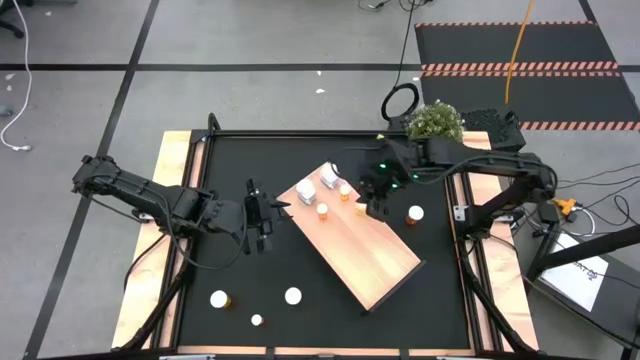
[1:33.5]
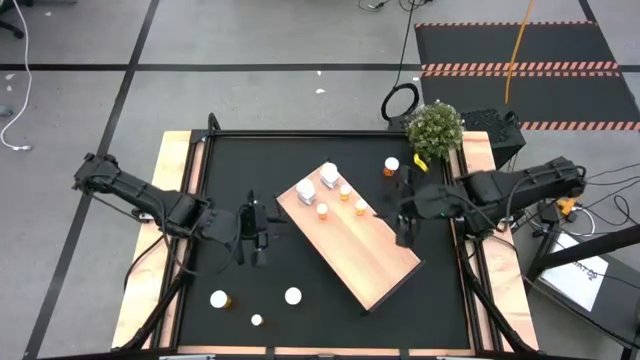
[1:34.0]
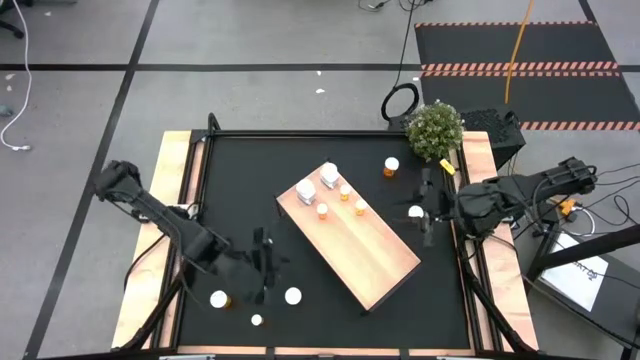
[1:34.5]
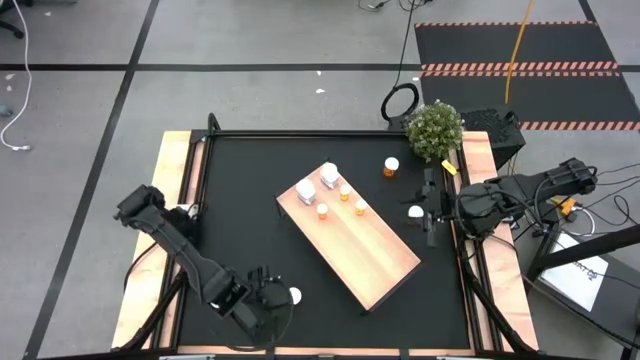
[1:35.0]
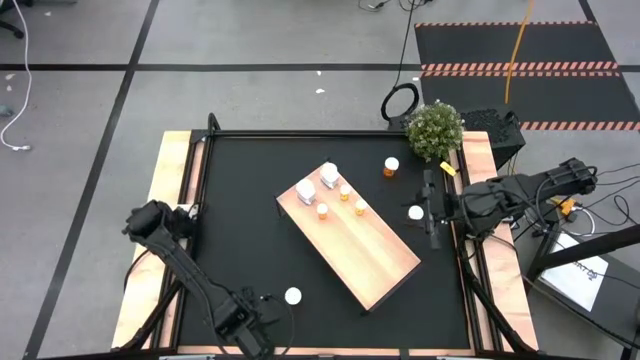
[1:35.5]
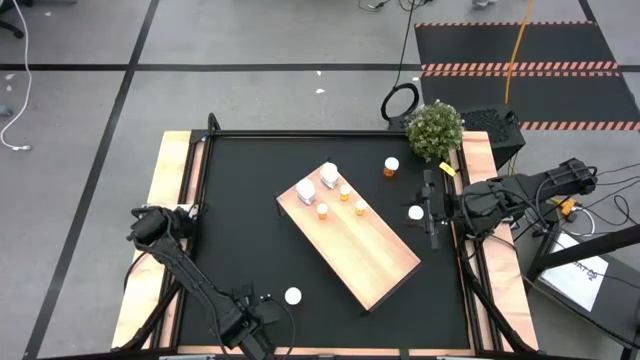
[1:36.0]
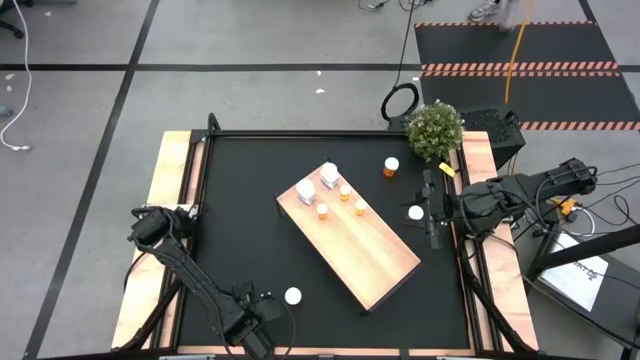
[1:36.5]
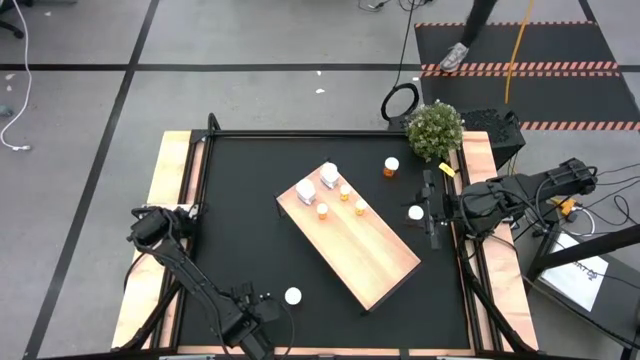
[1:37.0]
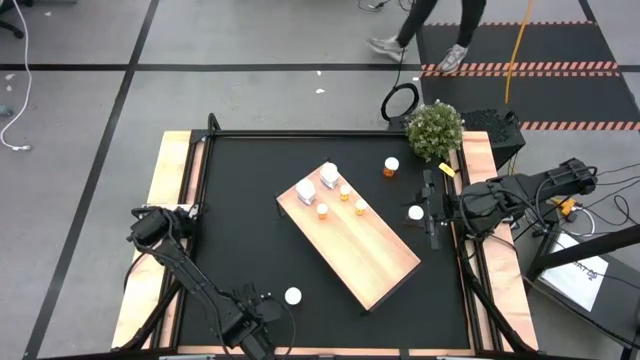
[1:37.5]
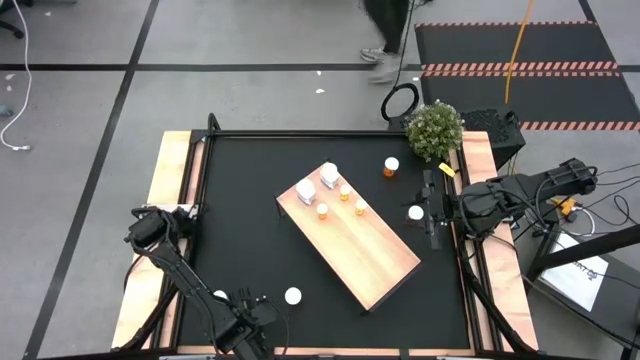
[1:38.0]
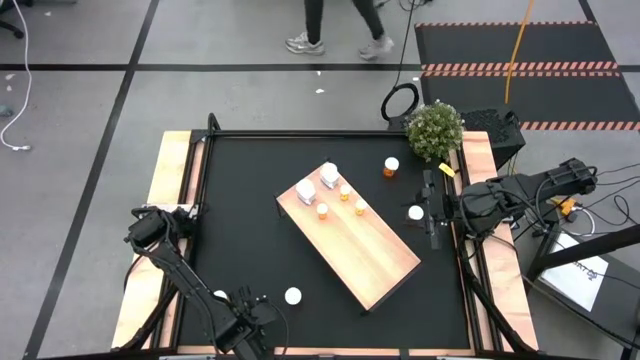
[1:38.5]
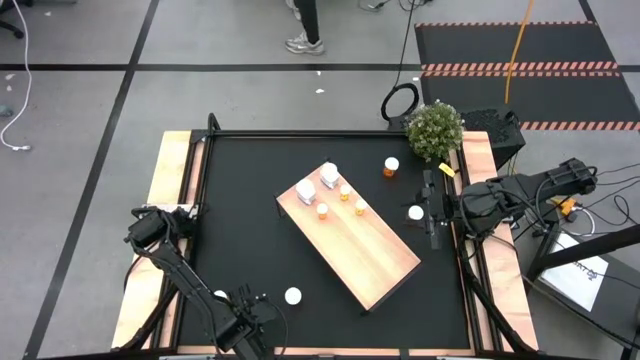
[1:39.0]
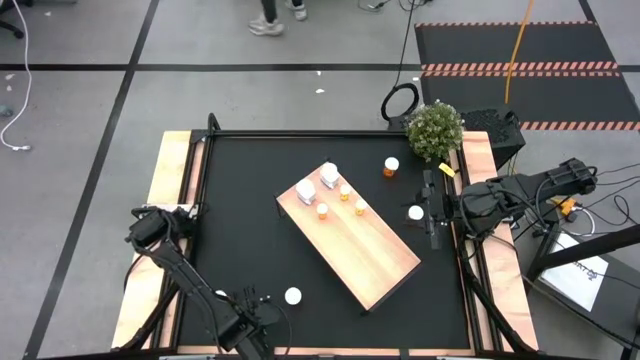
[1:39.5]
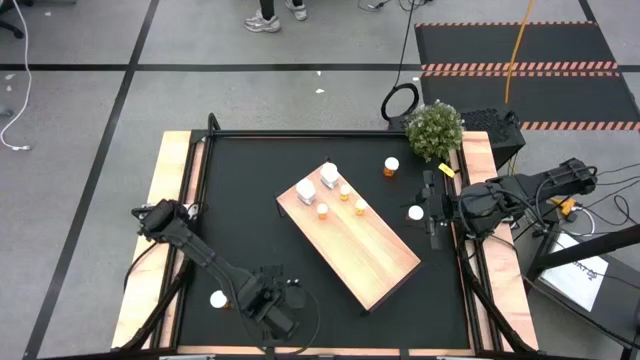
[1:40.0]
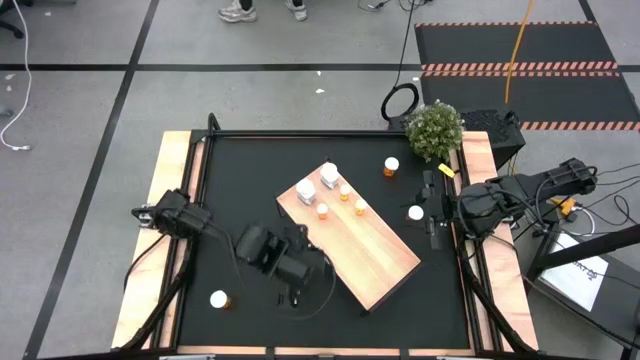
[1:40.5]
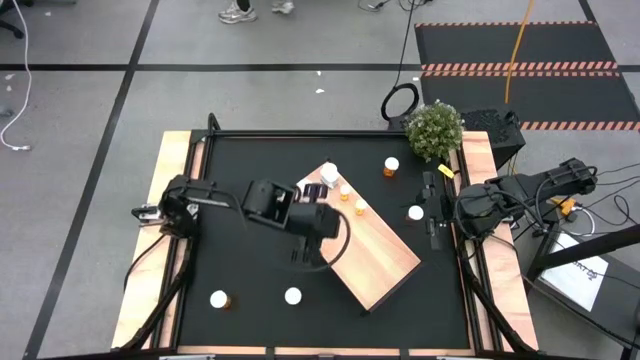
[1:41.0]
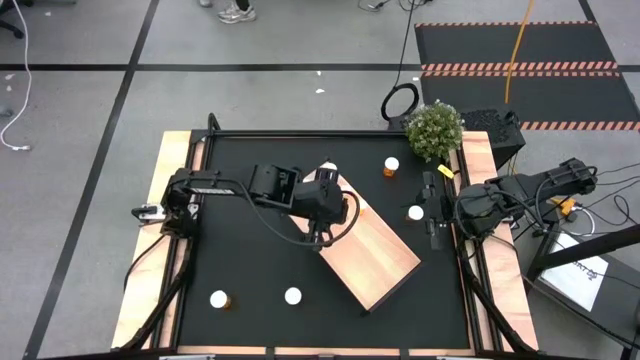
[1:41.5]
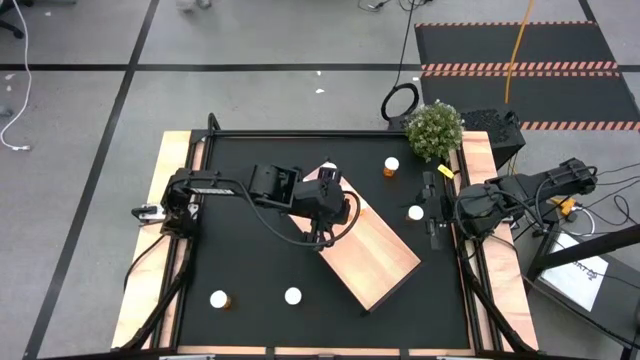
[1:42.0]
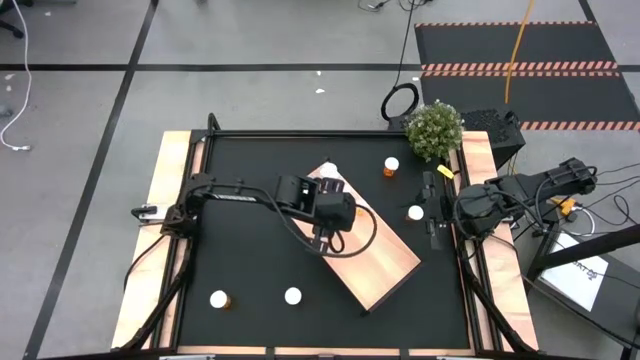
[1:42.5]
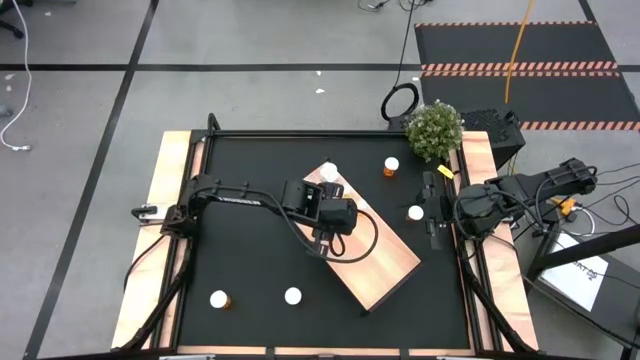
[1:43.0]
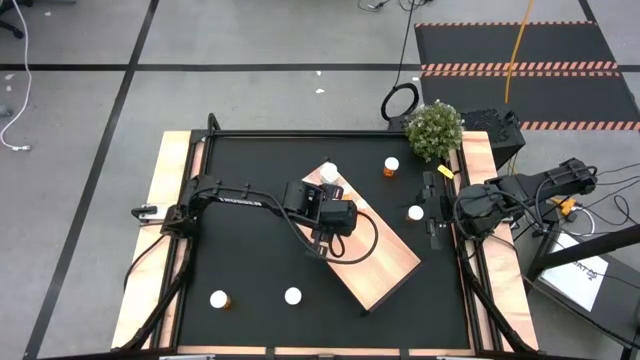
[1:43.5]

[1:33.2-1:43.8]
Task: Pick and place medicine bottles onto shelf by color
Put the small orange pill bottle on the shelf aligned with the other small orange pill bottle

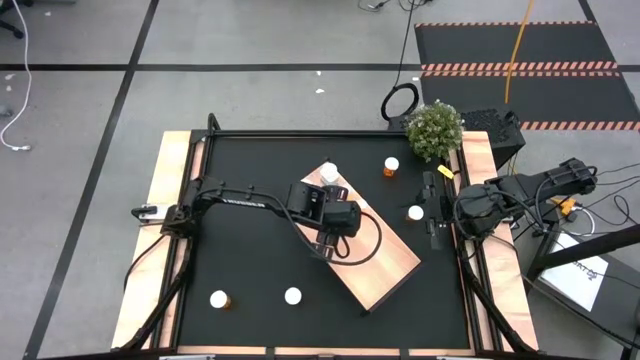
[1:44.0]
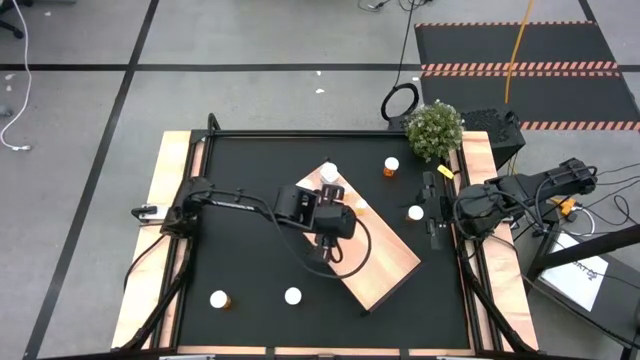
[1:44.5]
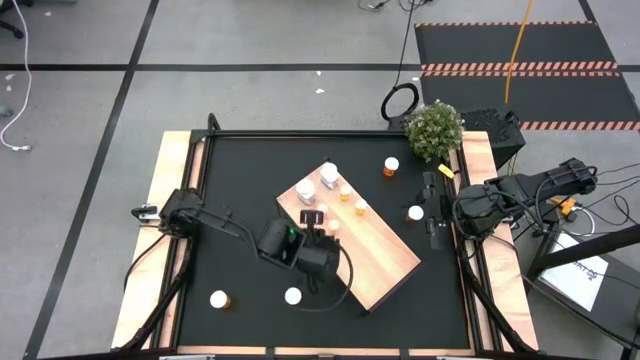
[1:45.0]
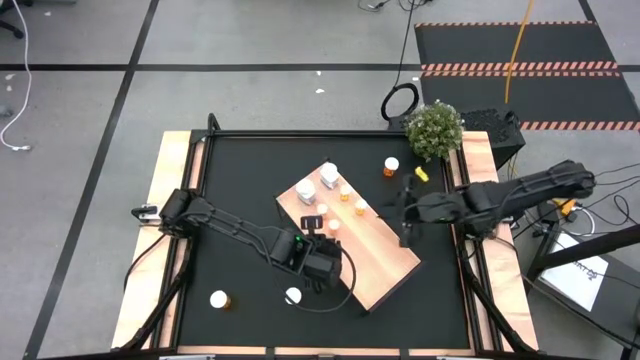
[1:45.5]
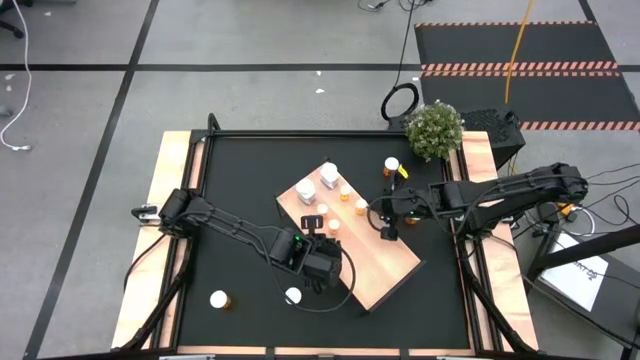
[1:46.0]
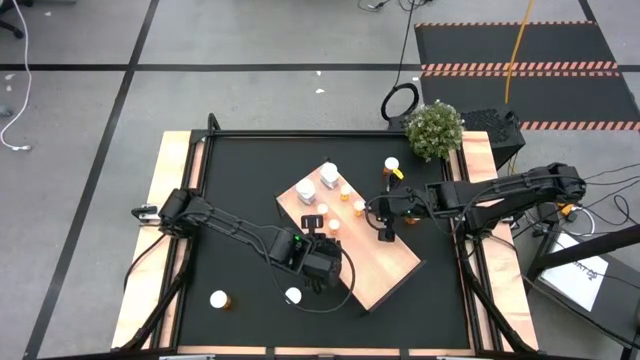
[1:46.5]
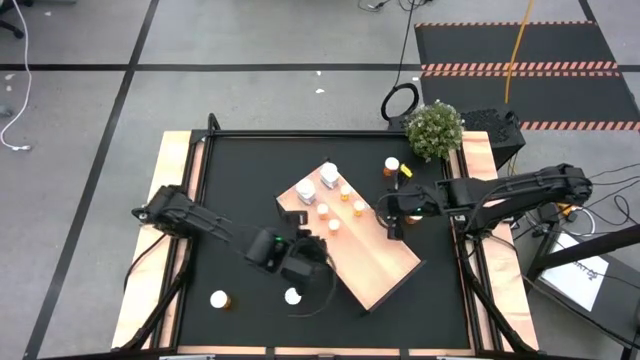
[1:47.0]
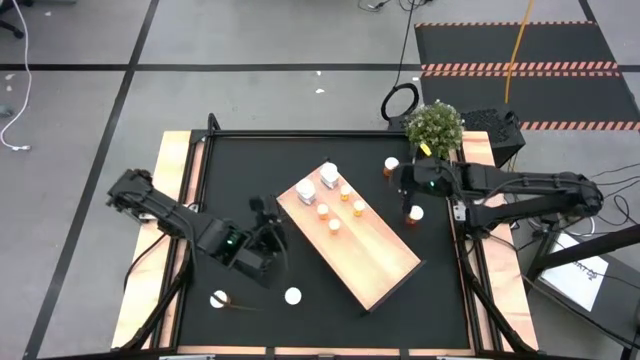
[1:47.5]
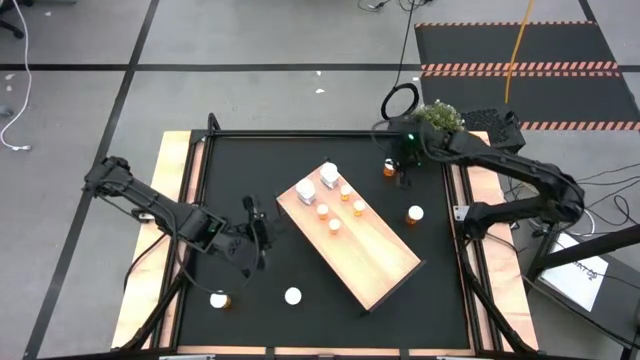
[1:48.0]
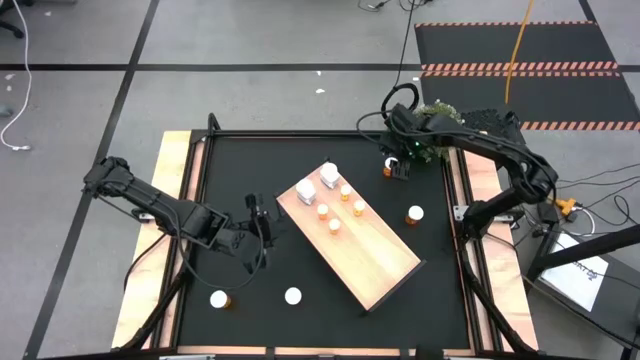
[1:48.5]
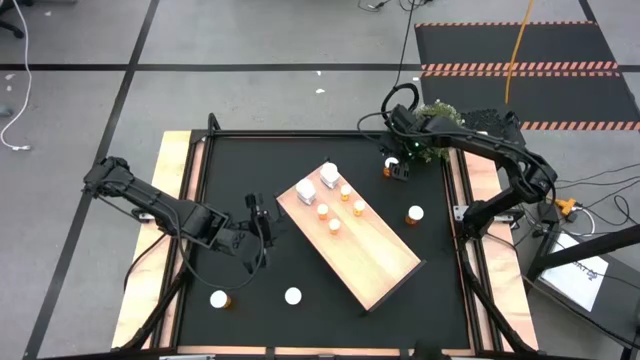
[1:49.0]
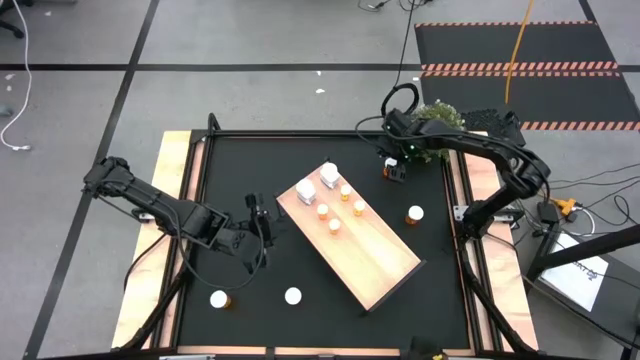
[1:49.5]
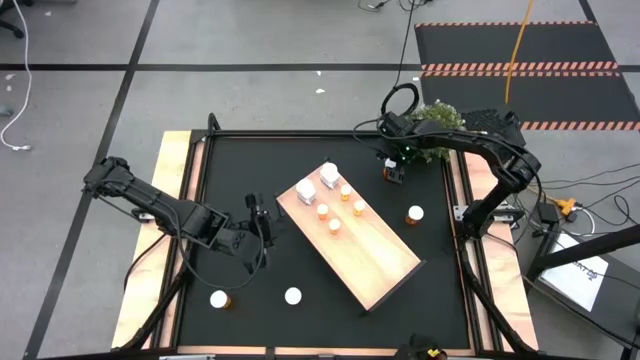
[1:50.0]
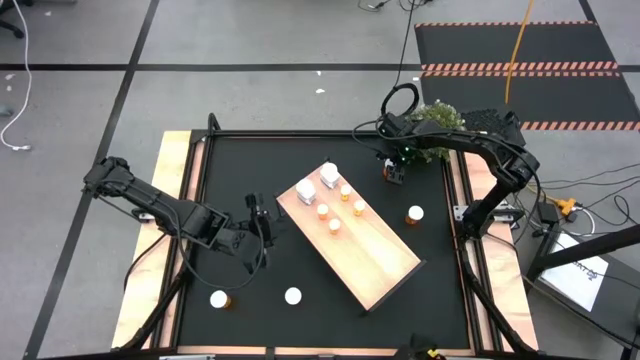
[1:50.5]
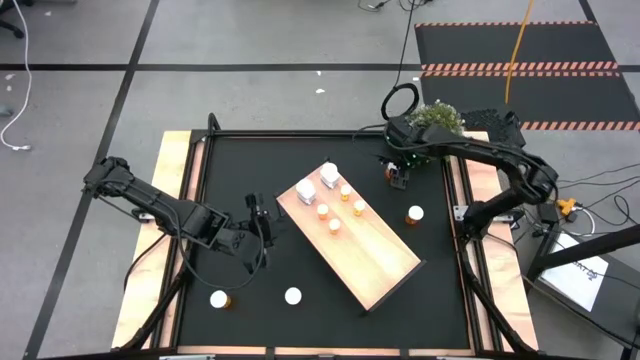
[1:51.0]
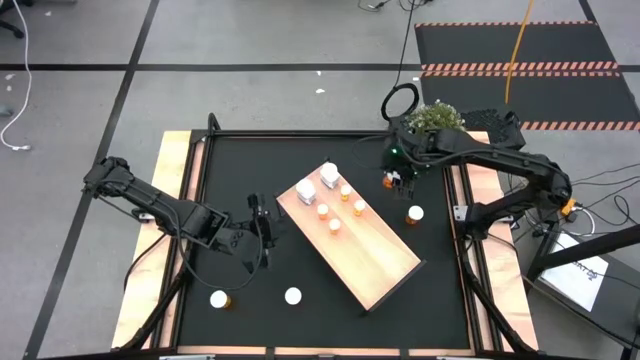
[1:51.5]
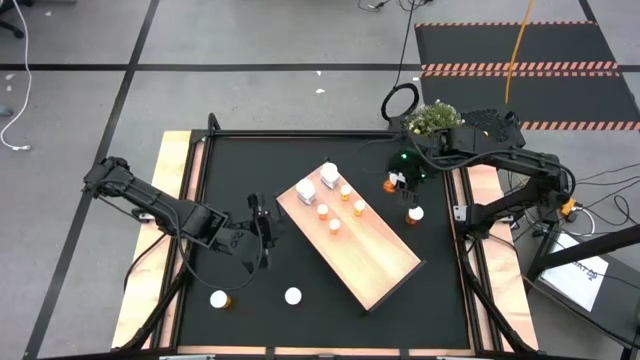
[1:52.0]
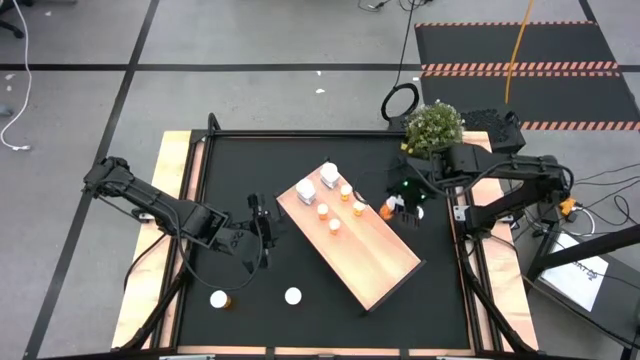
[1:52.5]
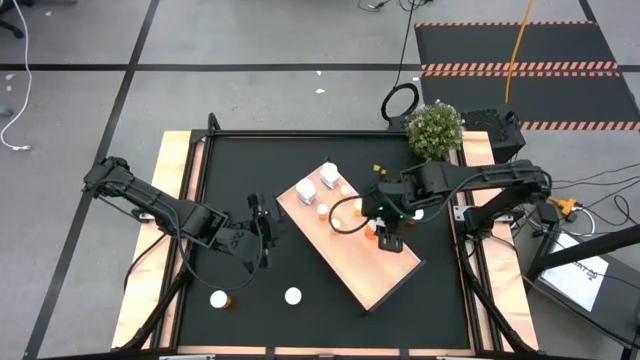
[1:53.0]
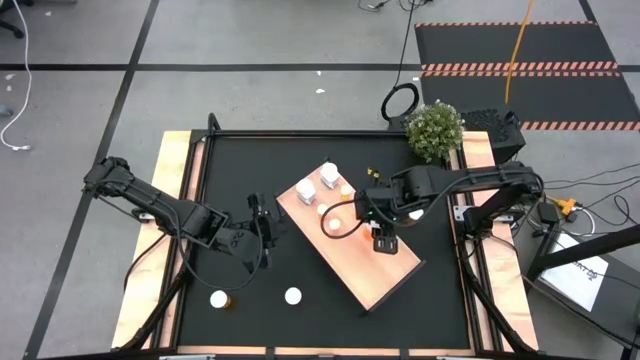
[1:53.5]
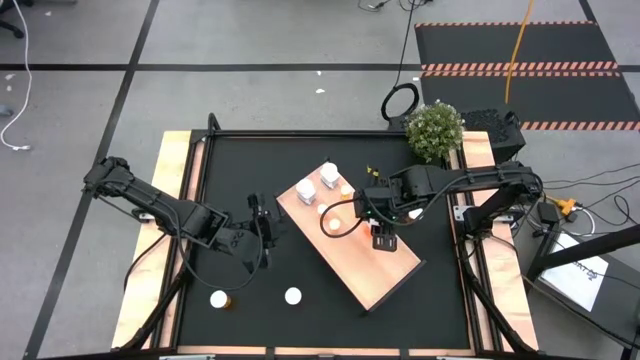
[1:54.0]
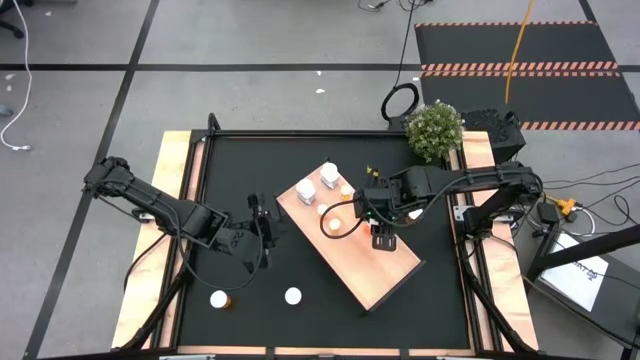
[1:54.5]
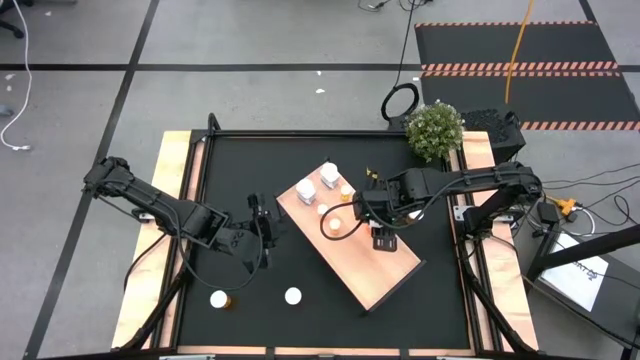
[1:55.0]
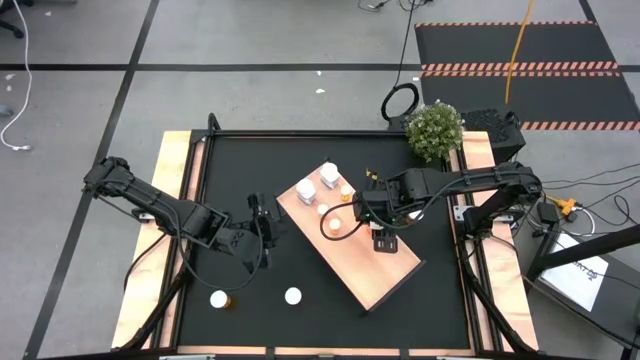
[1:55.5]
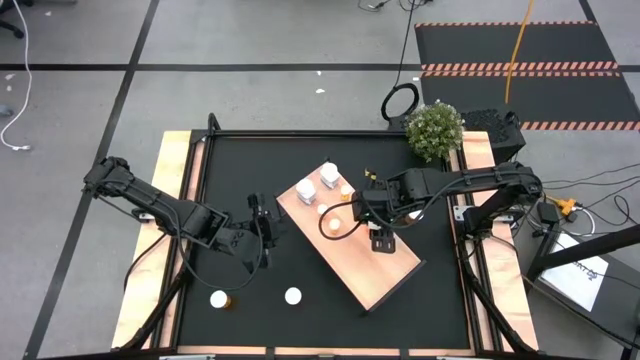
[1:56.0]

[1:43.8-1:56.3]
Put the large orange pill bottle on the shelf
